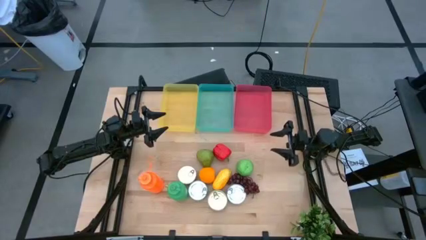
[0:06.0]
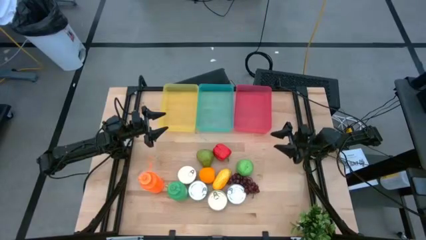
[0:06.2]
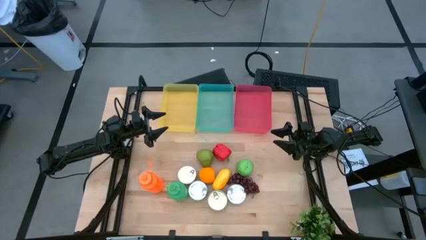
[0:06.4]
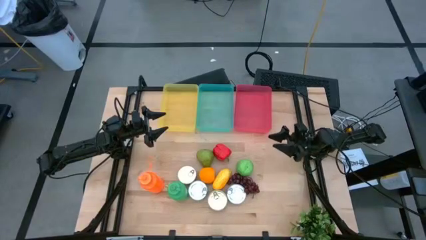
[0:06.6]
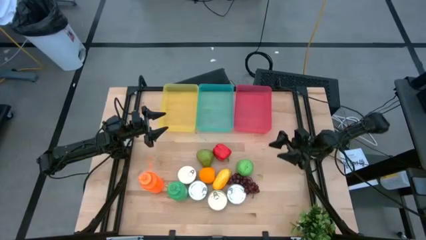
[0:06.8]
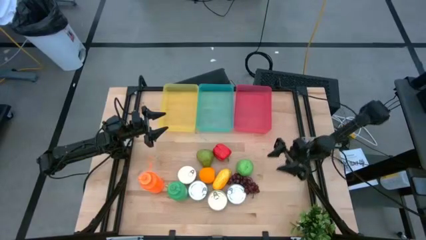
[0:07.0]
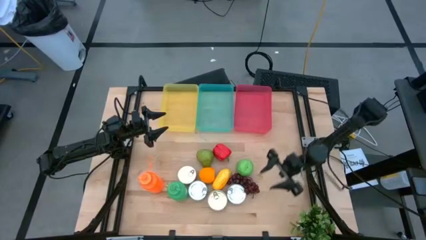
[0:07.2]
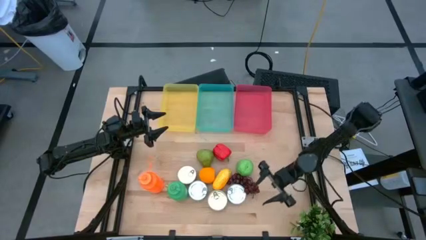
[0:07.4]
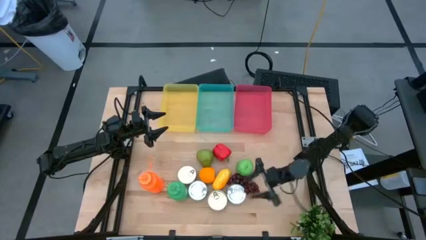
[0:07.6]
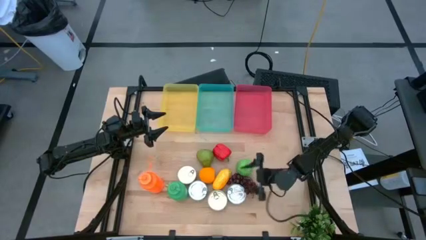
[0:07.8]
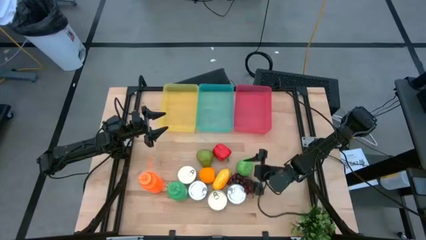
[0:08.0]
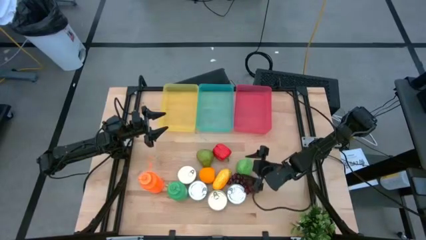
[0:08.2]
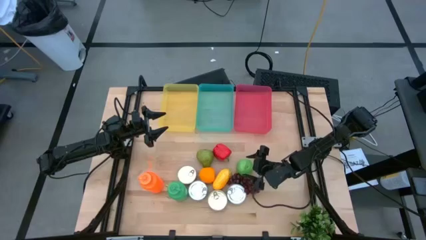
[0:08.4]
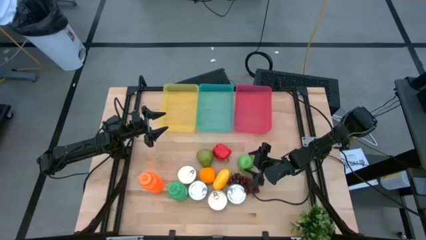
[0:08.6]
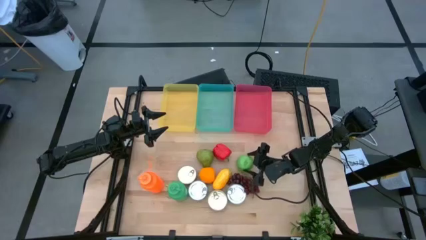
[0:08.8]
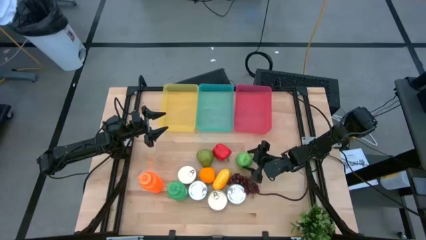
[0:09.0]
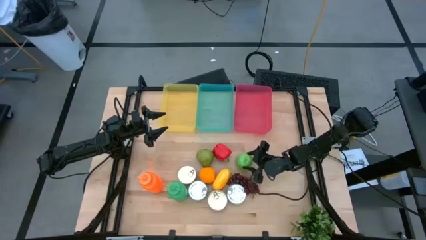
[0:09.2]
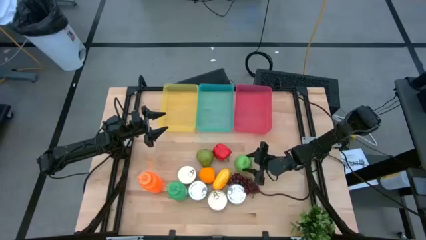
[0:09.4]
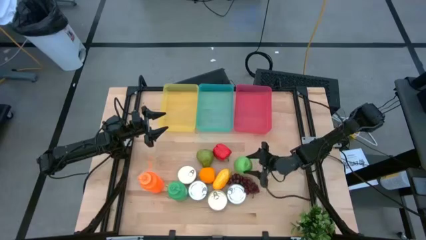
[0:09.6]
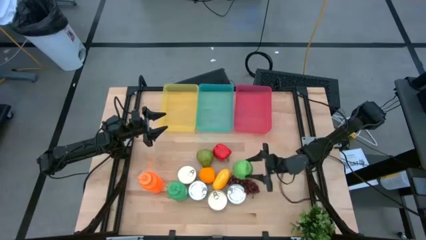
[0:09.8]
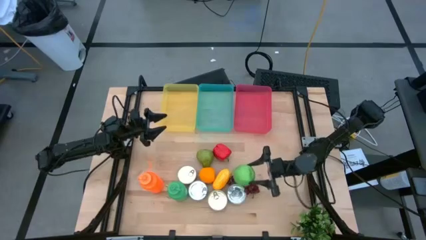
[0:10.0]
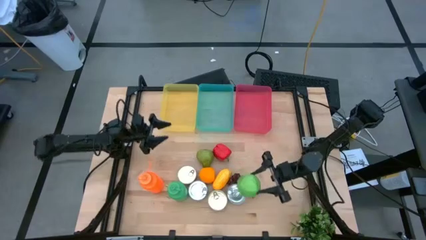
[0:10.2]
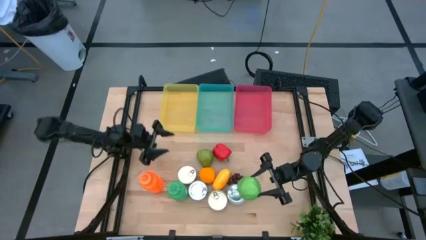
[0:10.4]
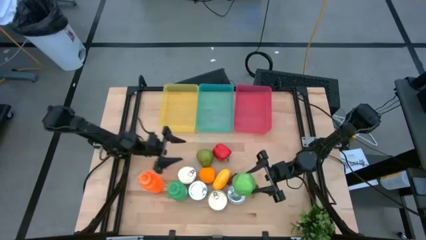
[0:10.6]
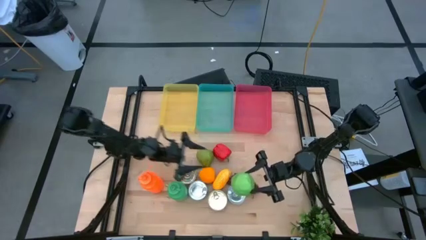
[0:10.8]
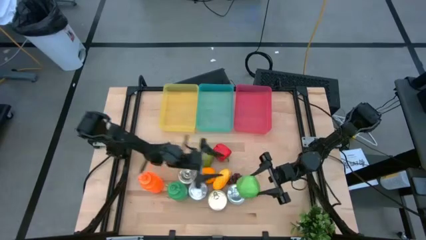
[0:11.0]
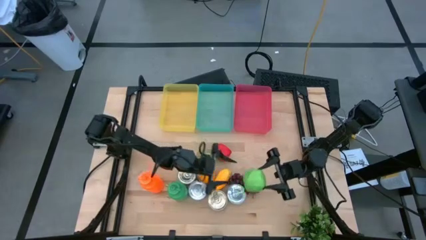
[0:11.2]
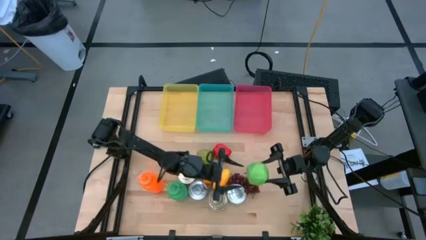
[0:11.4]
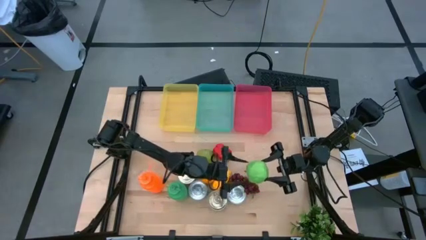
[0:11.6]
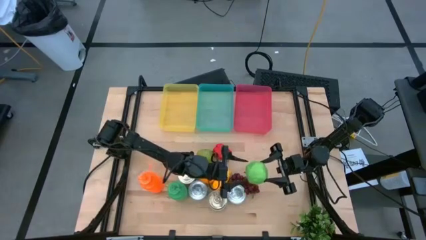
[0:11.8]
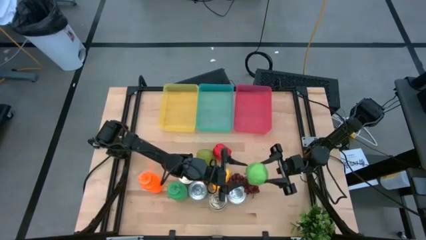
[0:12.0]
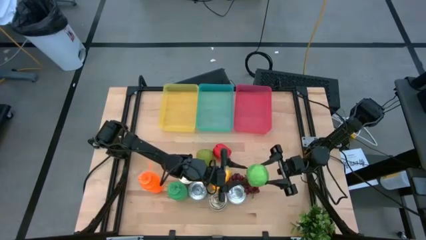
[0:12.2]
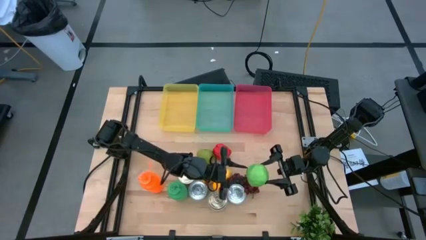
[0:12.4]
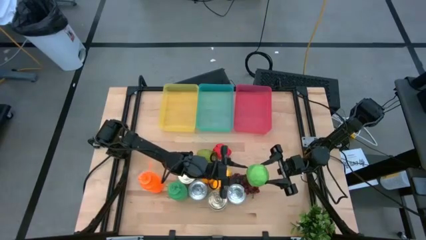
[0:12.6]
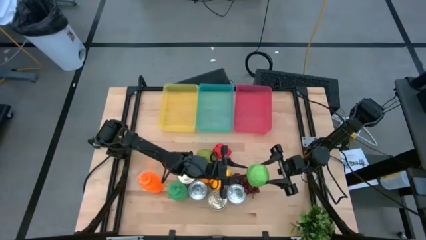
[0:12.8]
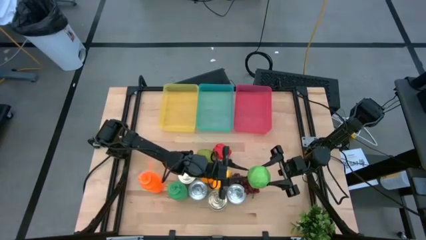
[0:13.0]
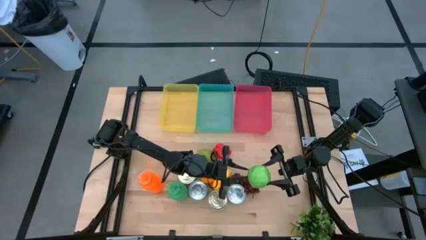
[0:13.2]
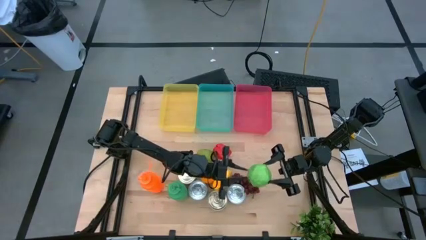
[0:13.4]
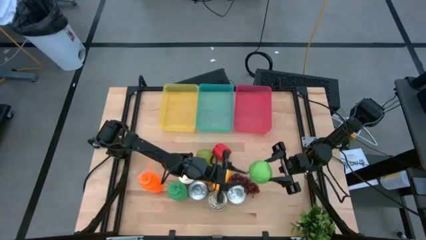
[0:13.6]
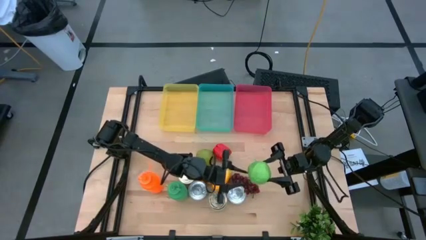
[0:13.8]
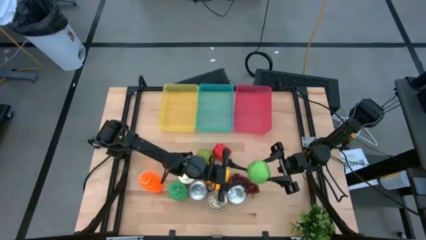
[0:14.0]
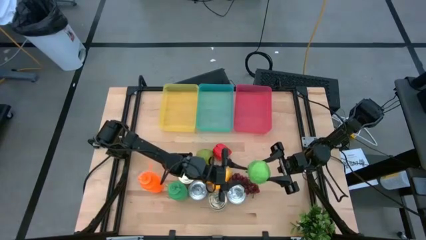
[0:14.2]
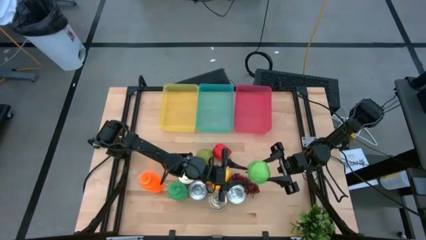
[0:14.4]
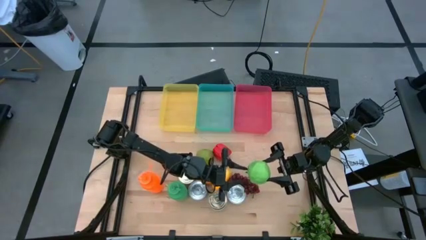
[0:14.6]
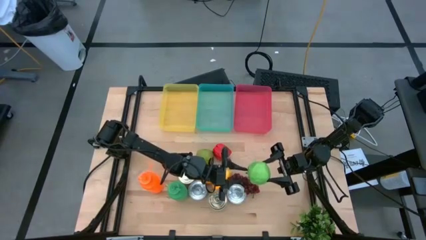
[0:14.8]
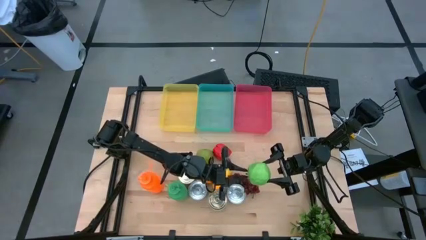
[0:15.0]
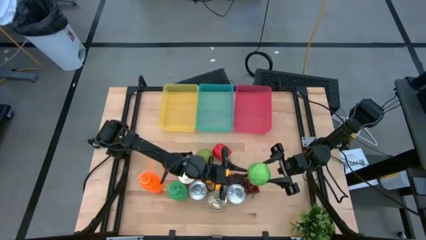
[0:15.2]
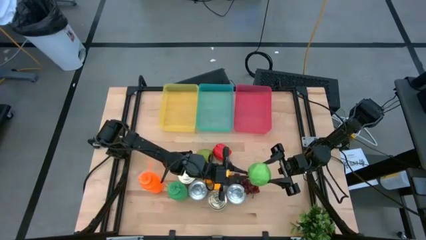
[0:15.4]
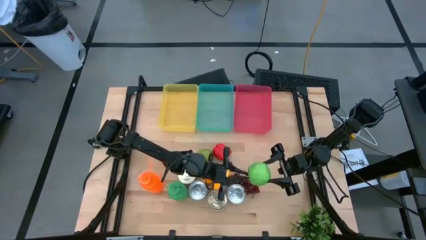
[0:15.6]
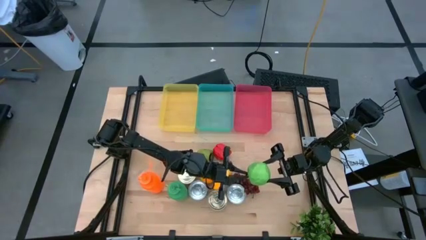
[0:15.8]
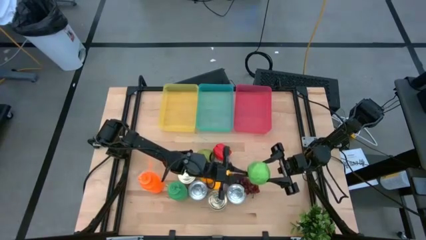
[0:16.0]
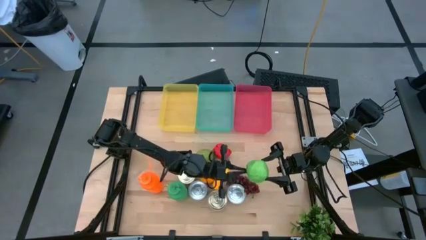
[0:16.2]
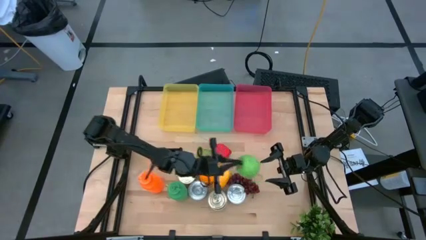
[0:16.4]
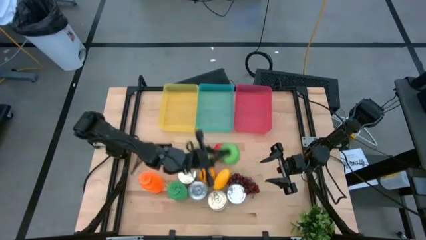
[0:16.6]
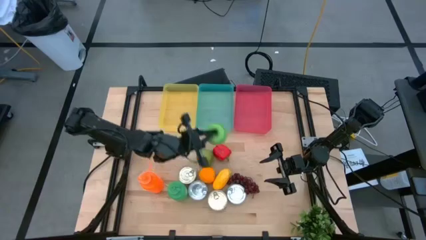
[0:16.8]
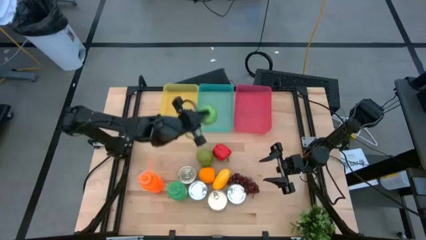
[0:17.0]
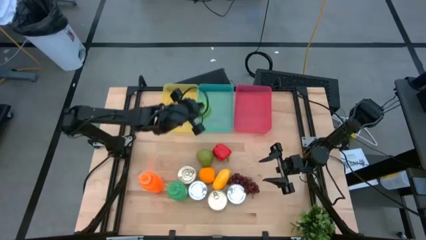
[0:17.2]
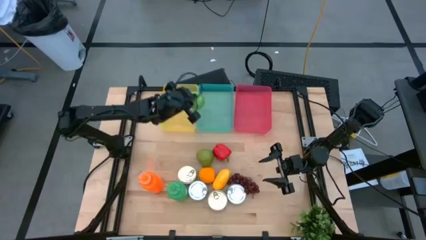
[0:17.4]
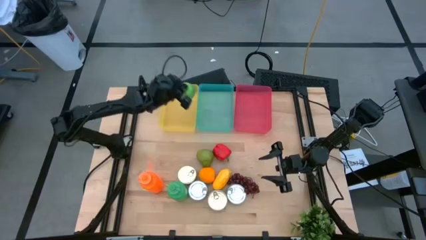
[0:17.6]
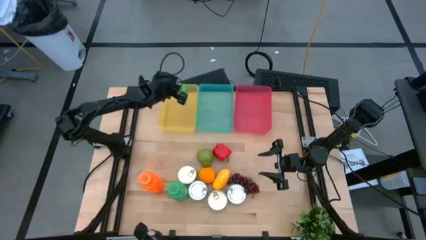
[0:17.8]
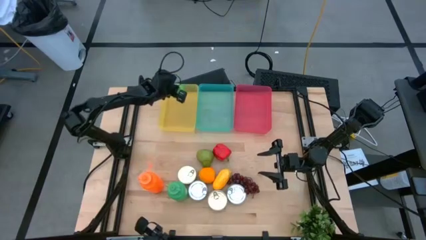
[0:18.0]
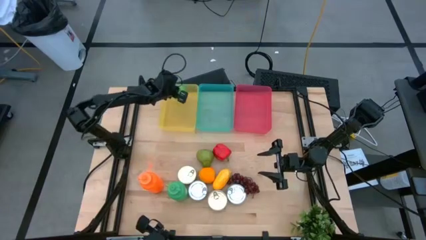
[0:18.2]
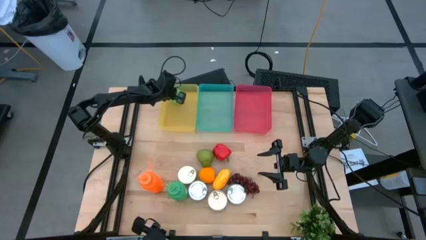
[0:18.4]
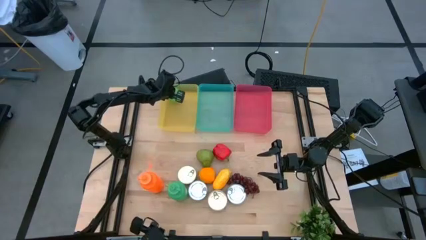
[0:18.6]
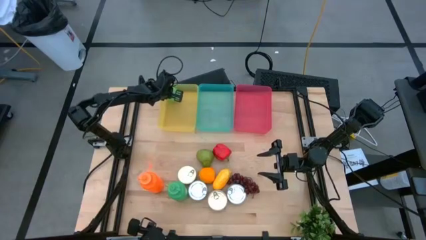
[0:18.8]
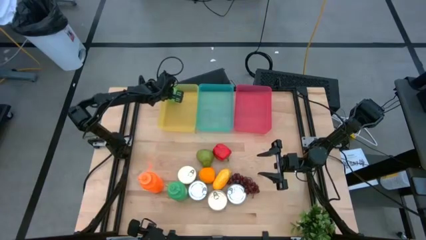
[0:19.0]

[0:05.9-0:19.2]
Task: Pick & Place Food Item
Put the green apple into the yellow bin
